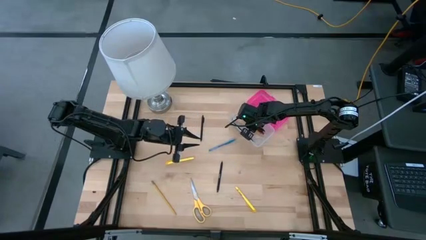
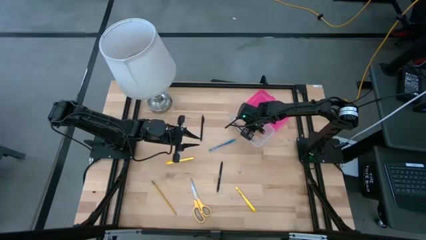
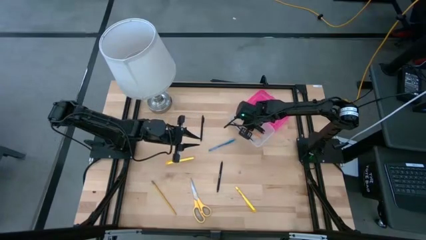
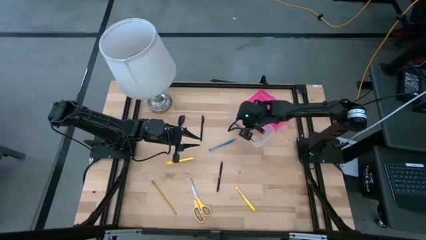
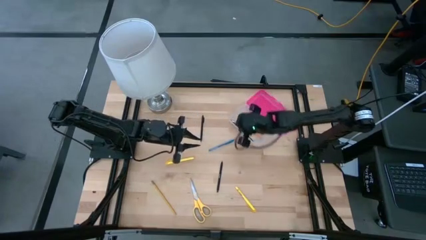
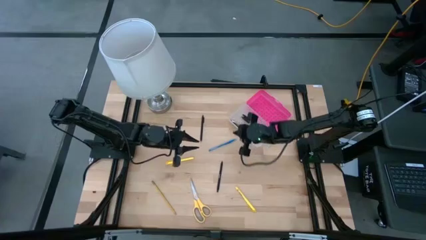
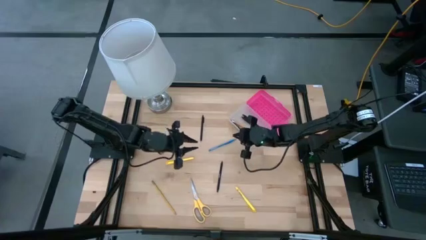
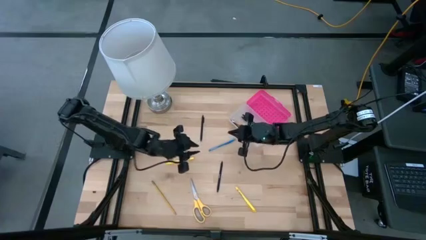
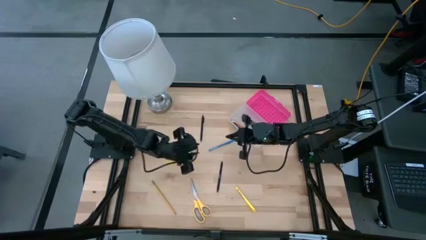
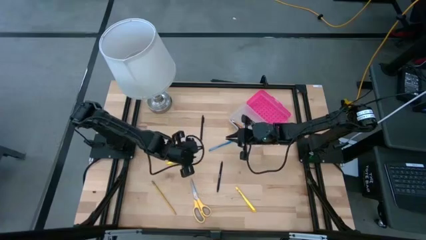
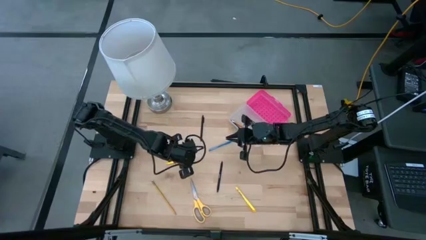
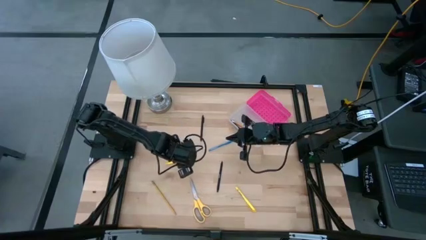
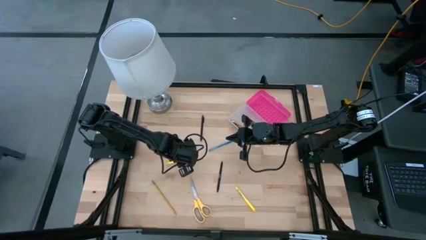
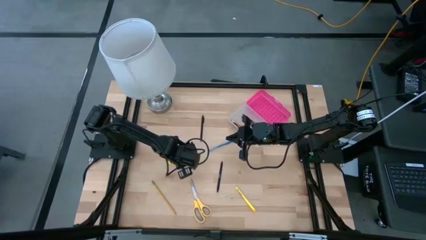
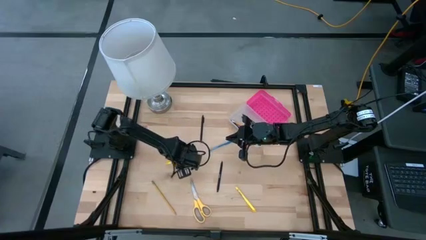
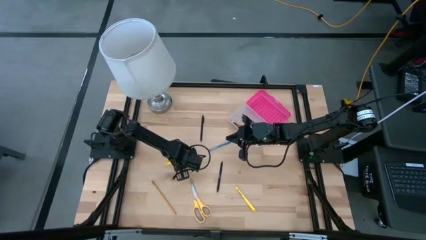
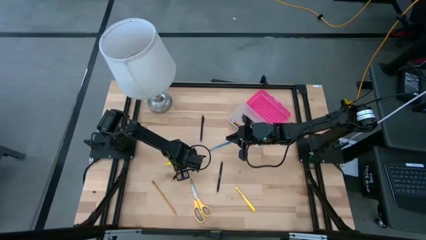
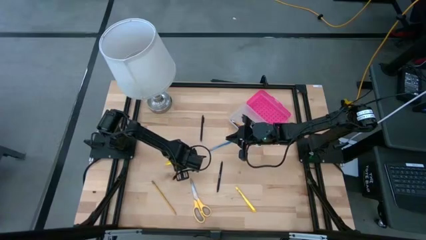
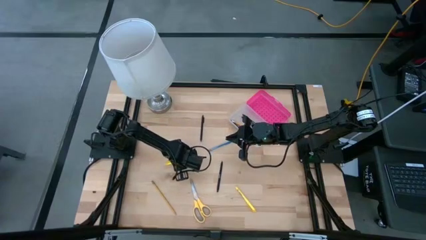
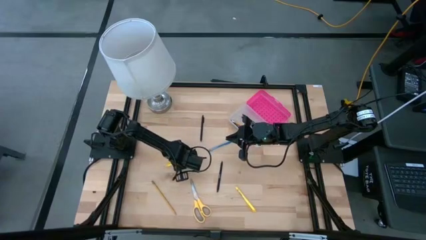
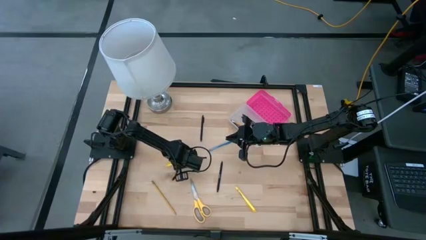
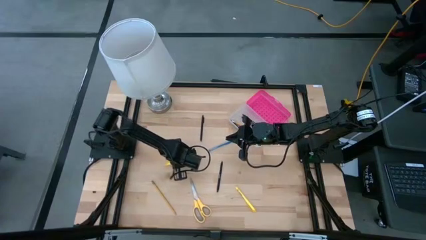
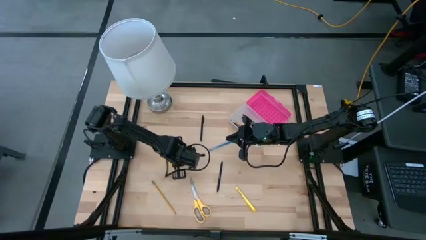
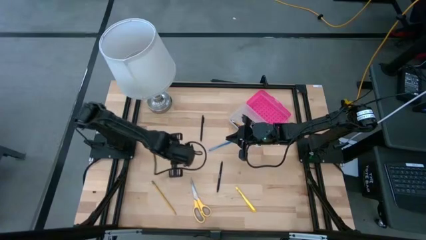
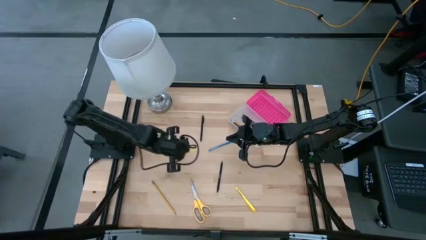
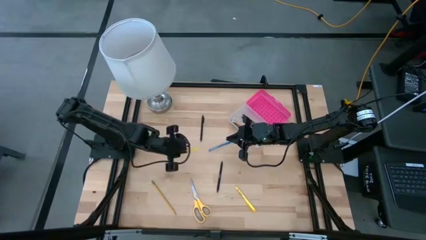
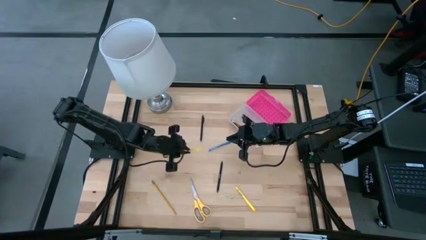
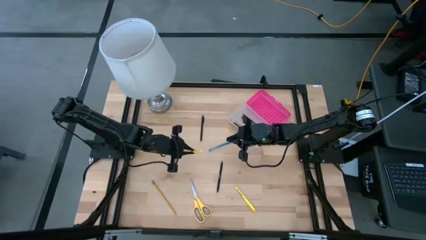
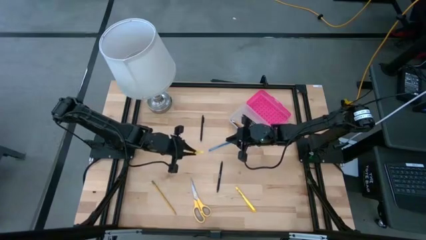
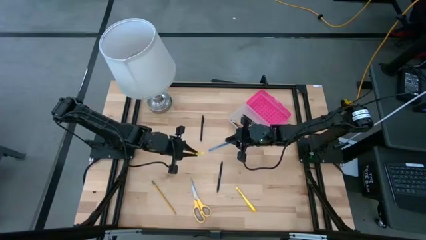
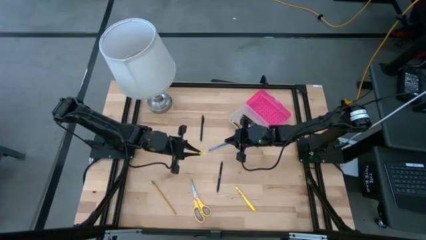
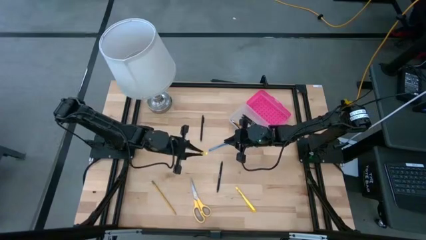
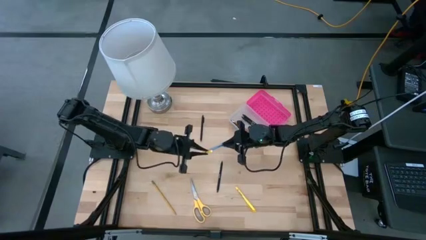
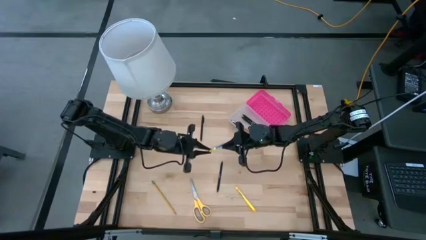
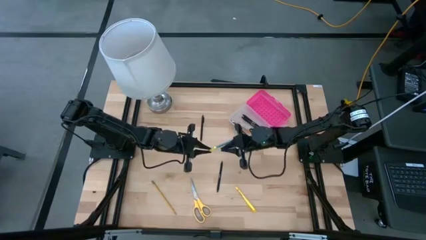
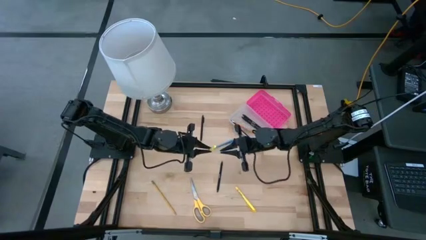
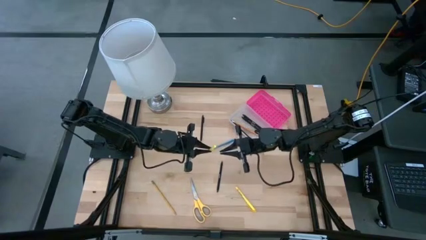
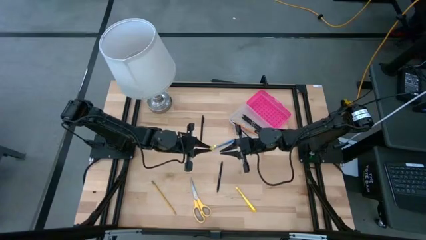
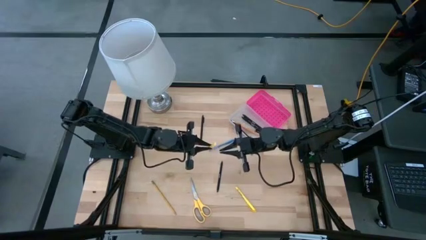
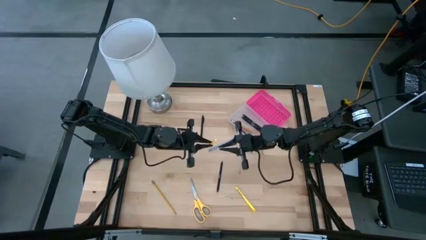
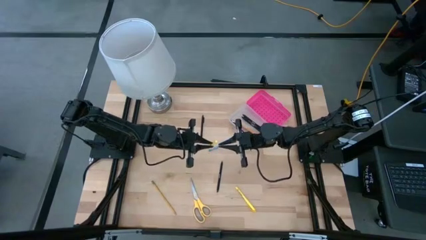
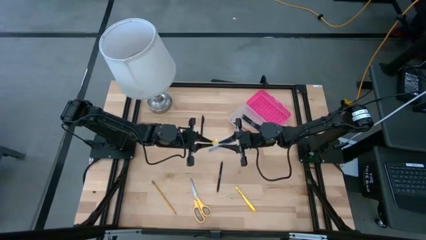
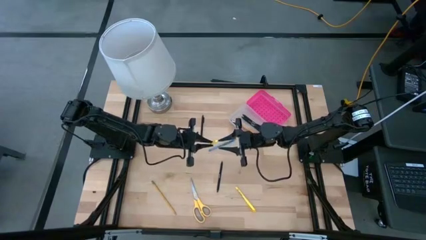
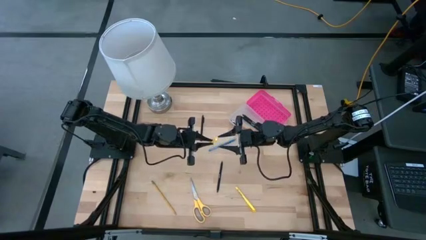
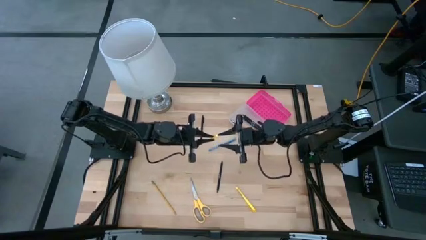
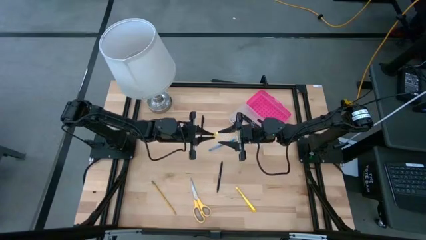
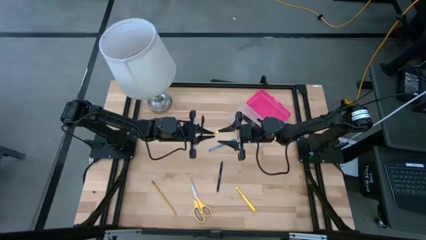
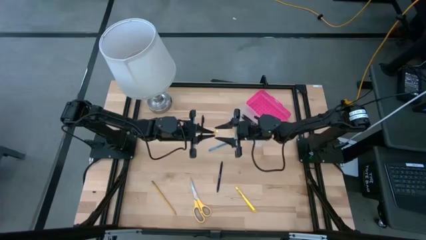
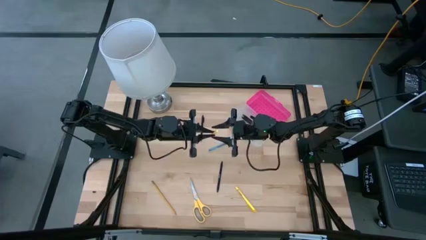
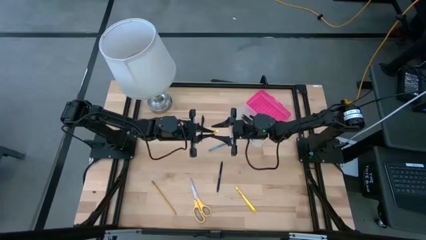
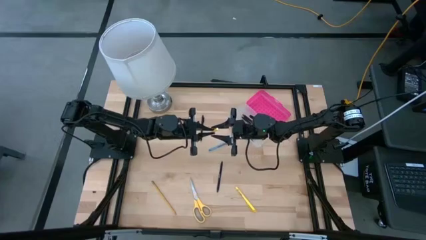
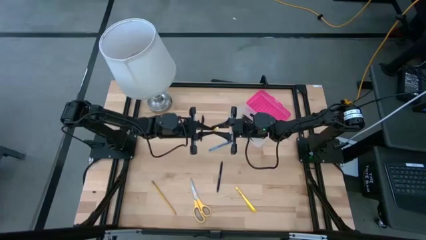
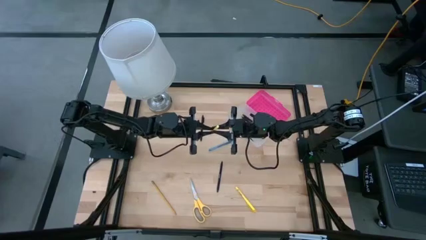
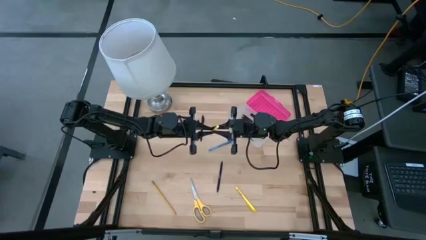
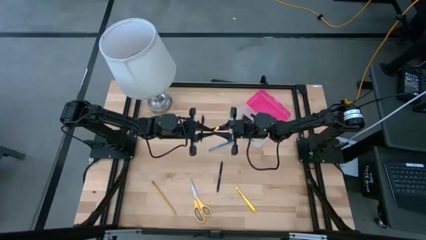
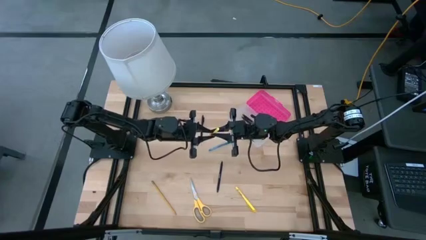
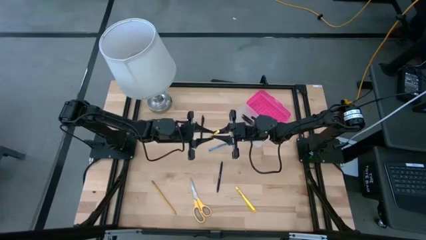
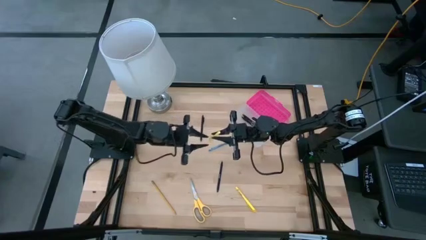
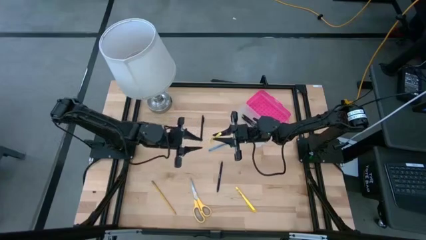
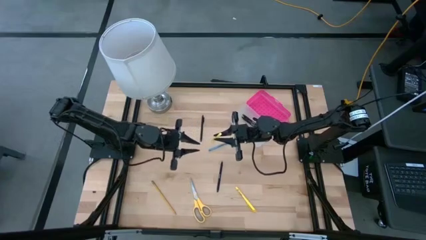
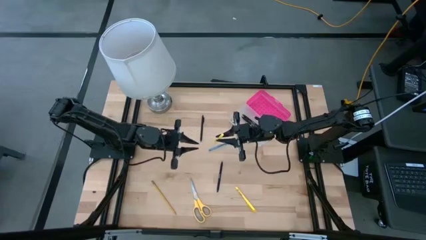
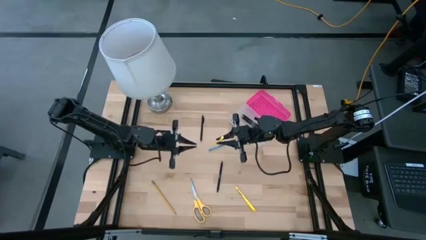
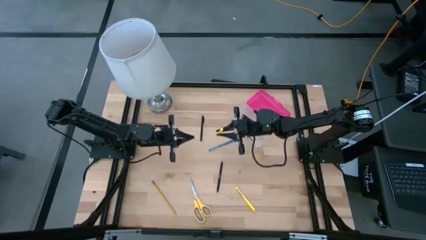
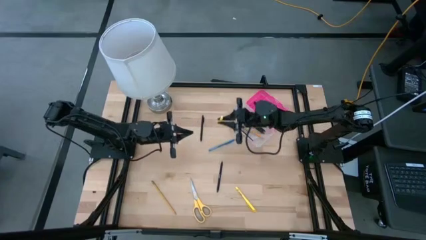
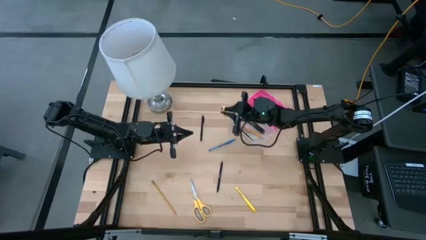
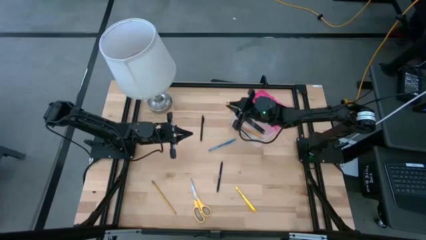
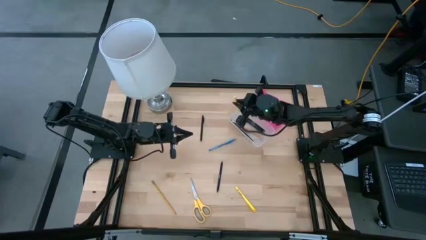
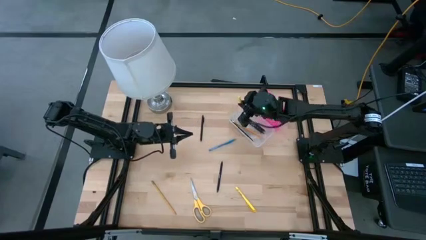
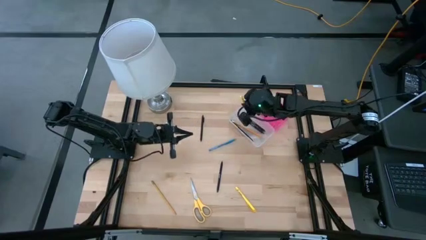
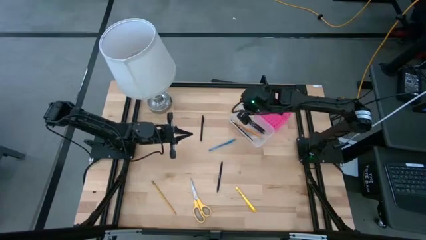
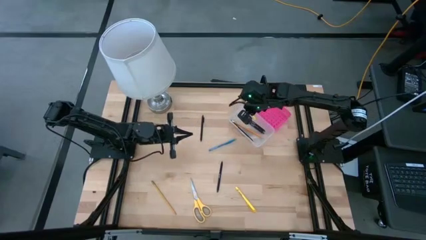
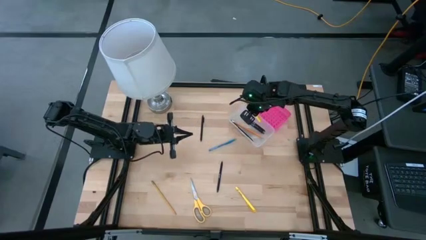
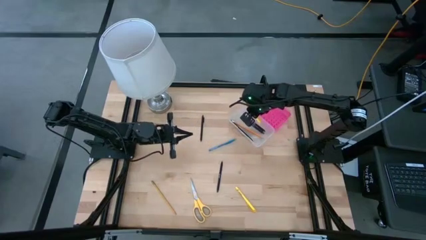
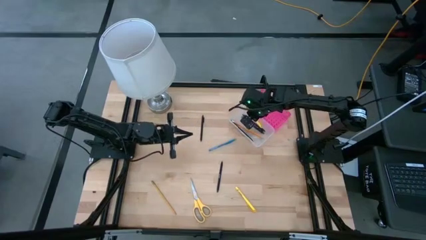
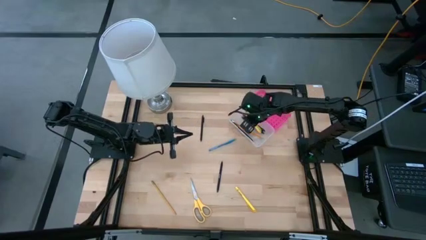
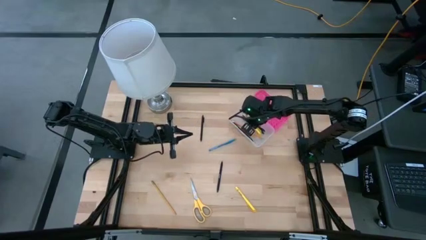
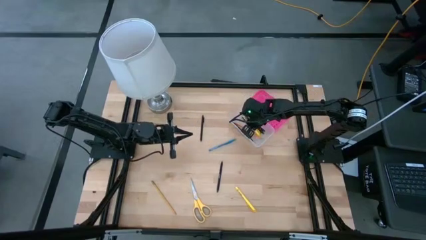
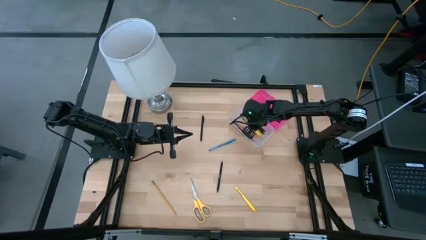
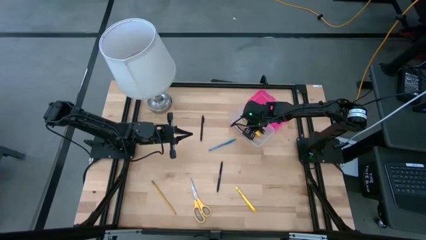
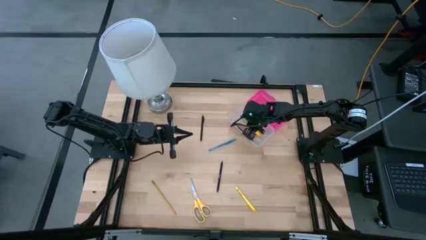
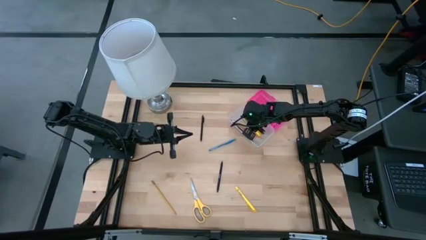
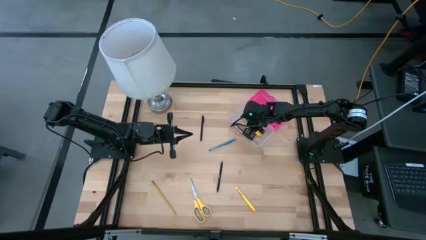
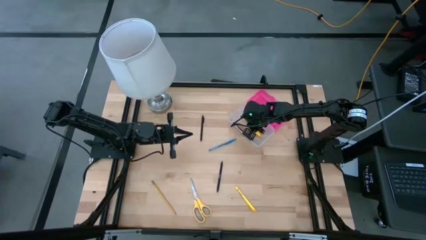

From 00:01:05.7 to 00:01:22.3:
Task: Pick & place school supplies into a supply box
Put the yellow pen into the pink supply box
